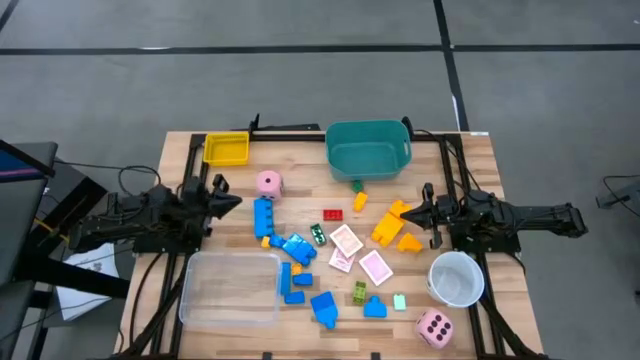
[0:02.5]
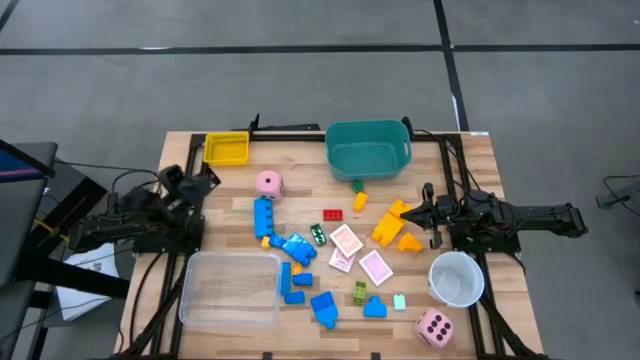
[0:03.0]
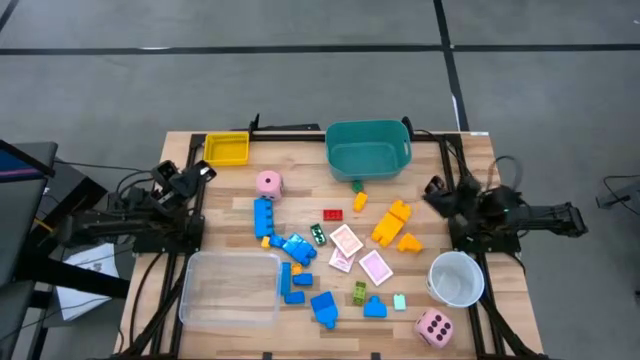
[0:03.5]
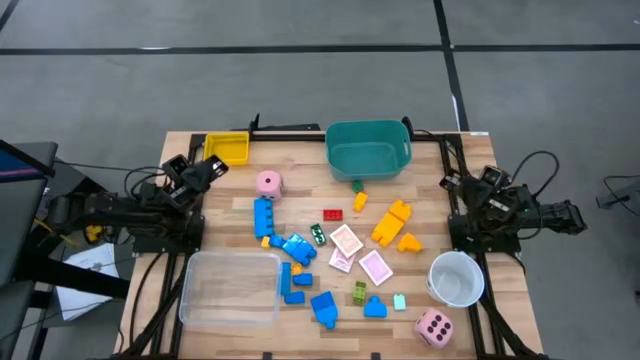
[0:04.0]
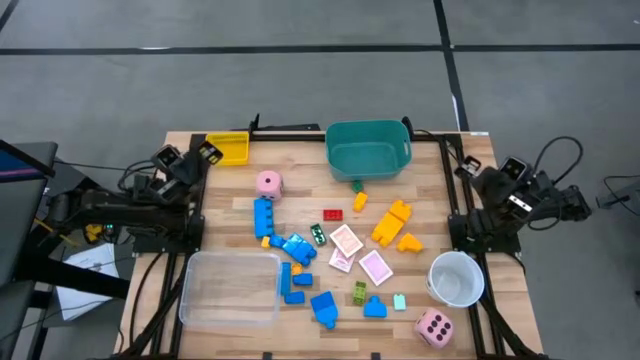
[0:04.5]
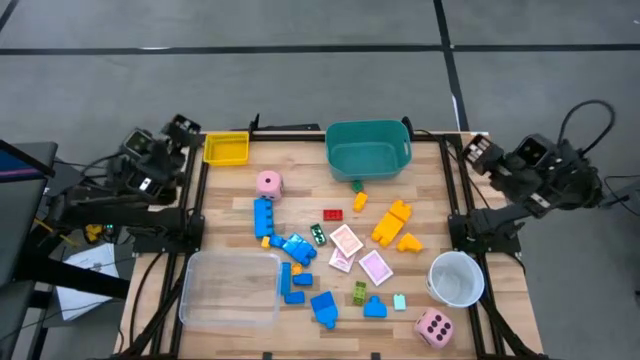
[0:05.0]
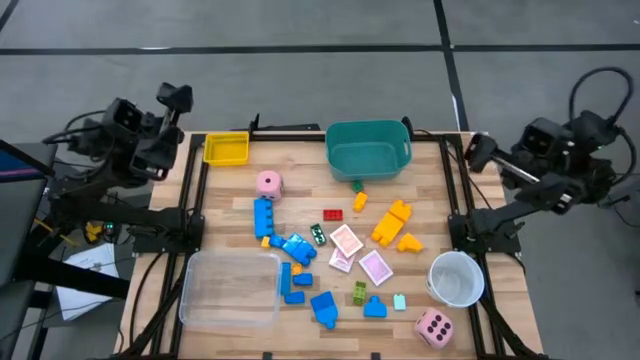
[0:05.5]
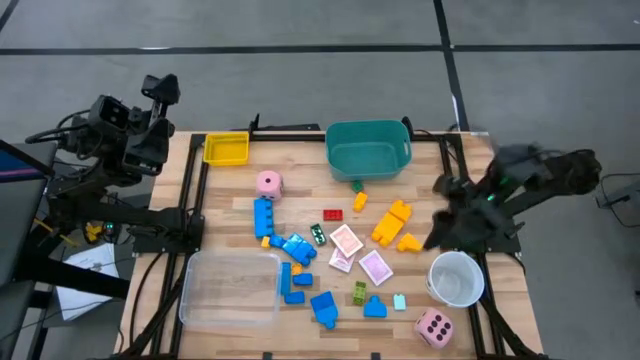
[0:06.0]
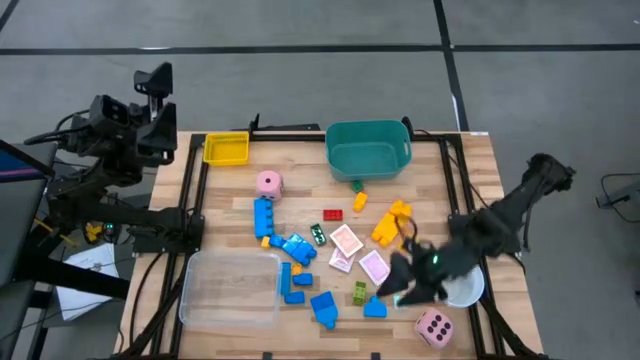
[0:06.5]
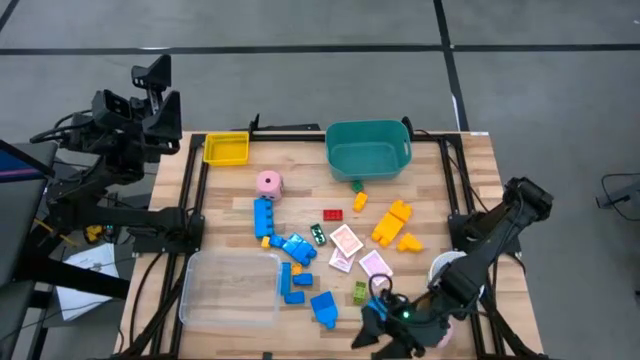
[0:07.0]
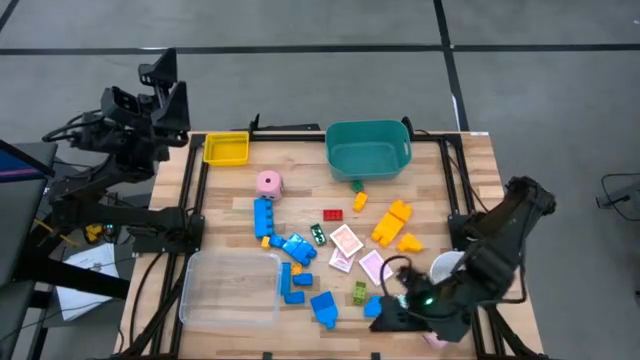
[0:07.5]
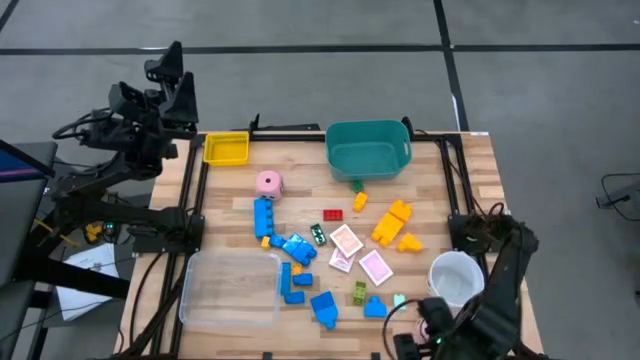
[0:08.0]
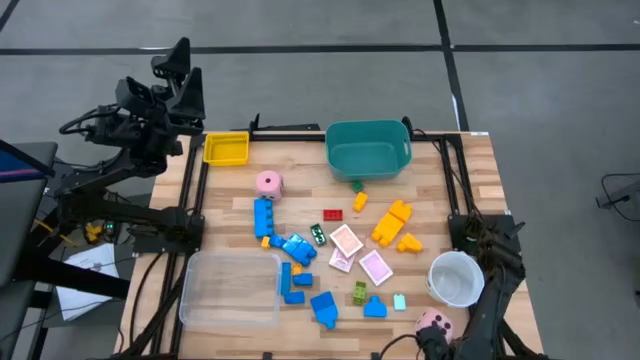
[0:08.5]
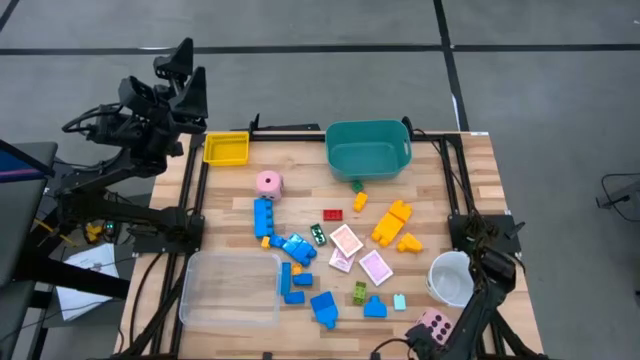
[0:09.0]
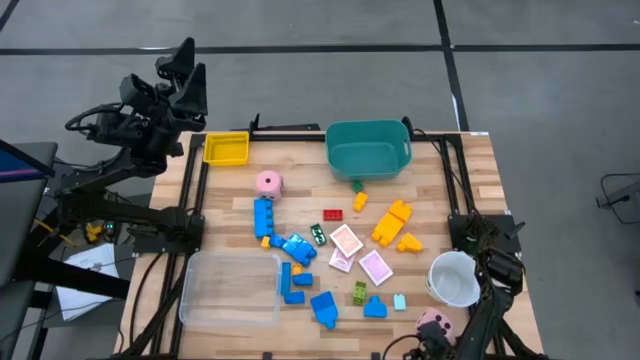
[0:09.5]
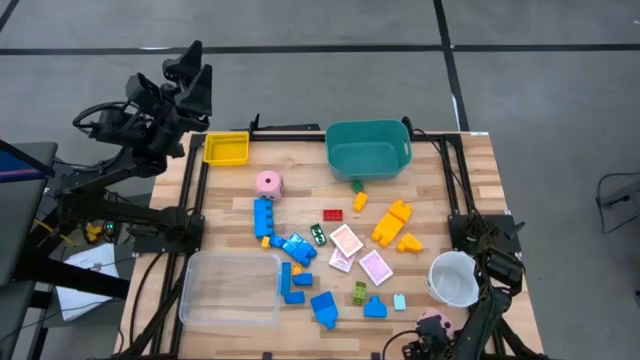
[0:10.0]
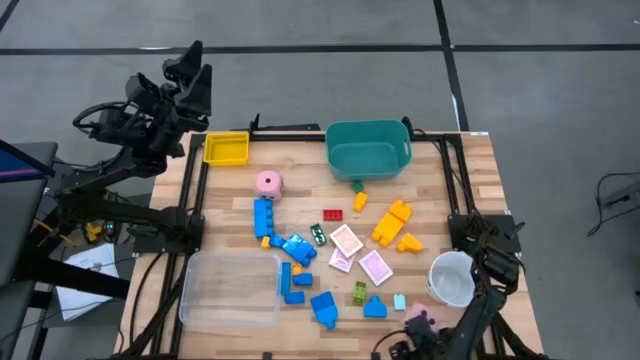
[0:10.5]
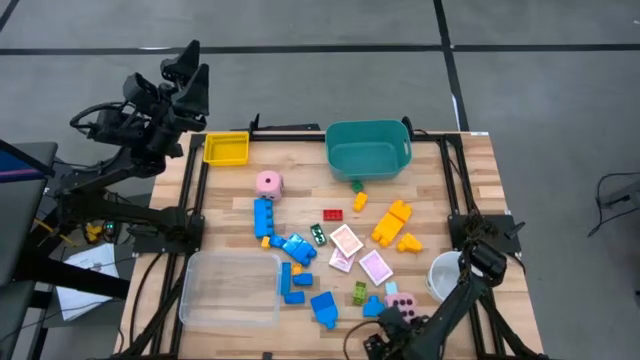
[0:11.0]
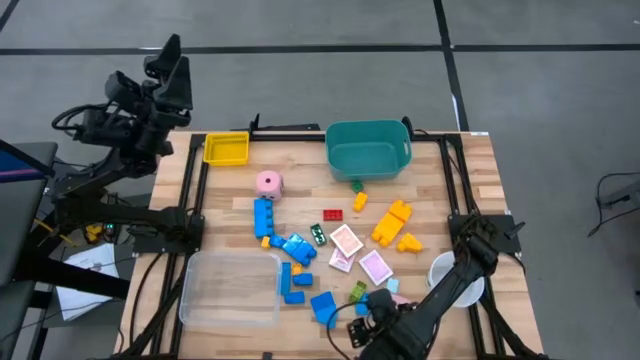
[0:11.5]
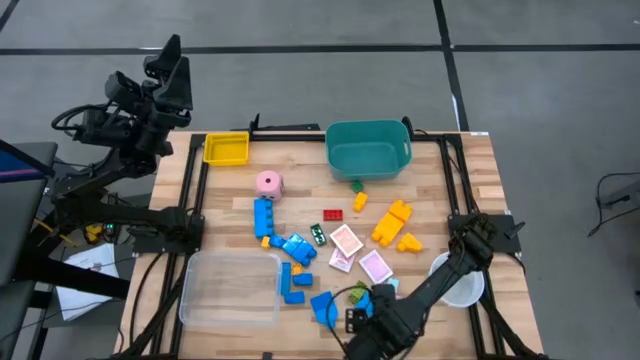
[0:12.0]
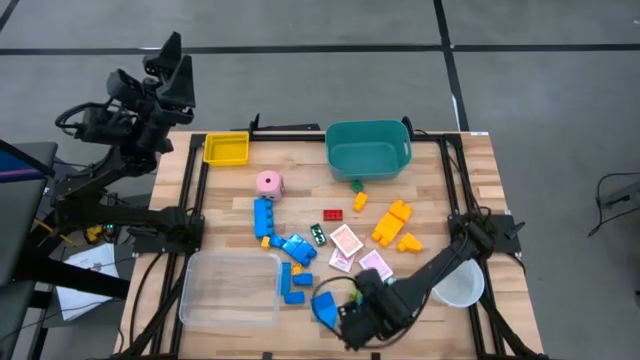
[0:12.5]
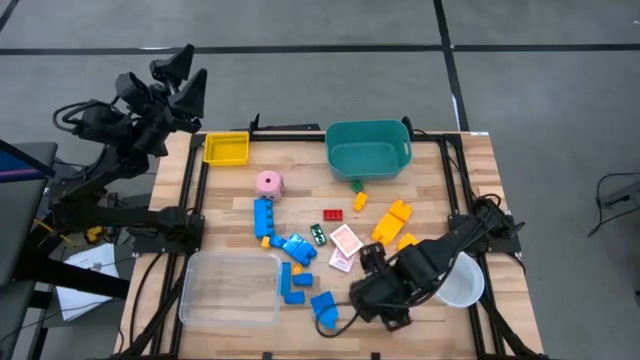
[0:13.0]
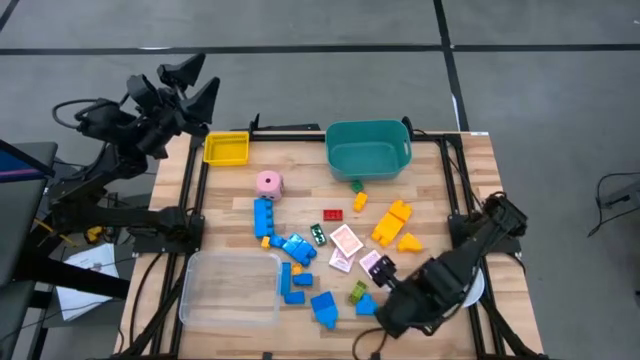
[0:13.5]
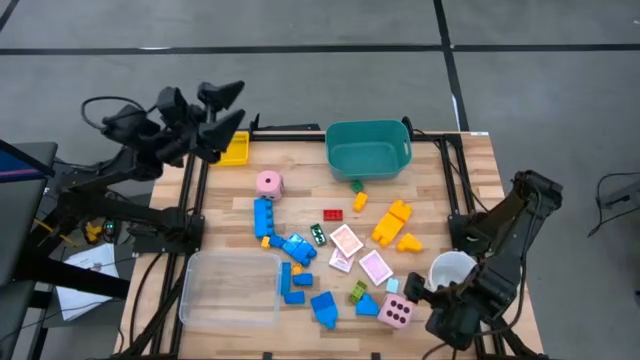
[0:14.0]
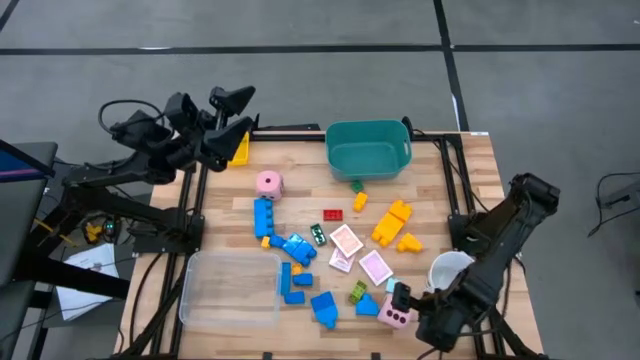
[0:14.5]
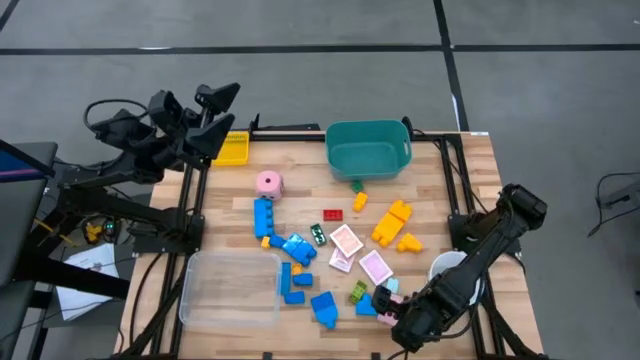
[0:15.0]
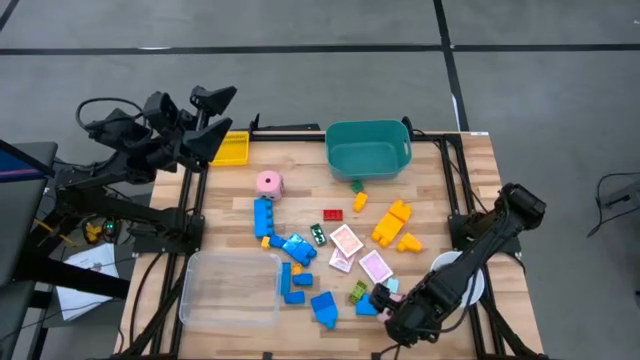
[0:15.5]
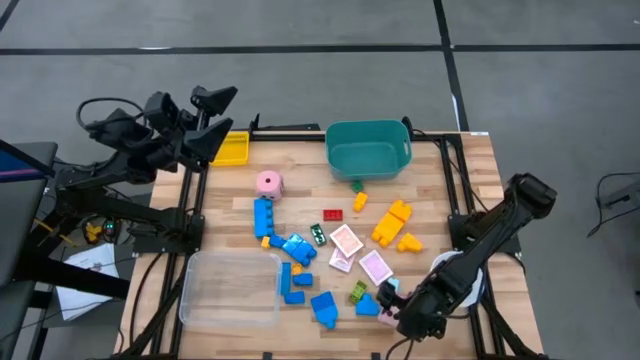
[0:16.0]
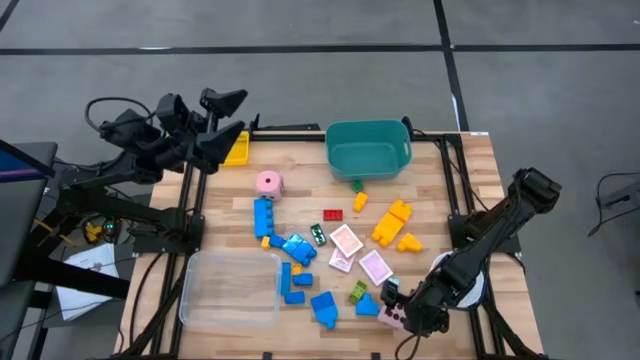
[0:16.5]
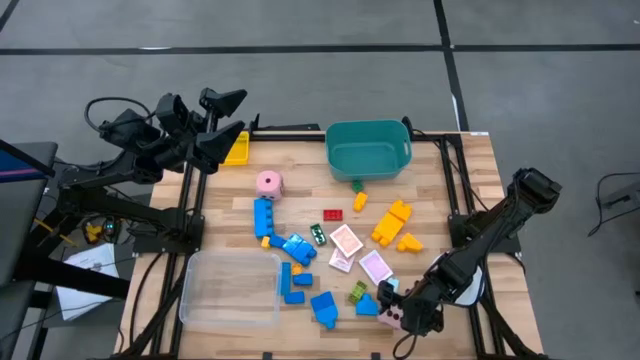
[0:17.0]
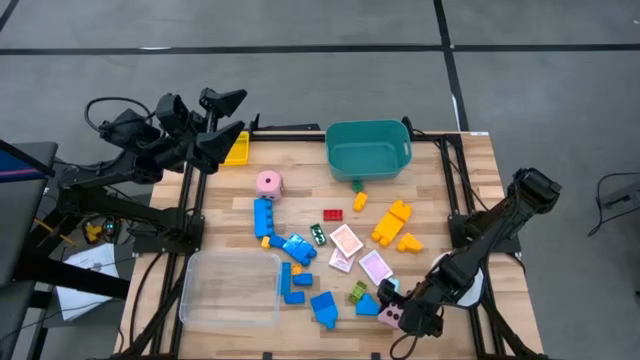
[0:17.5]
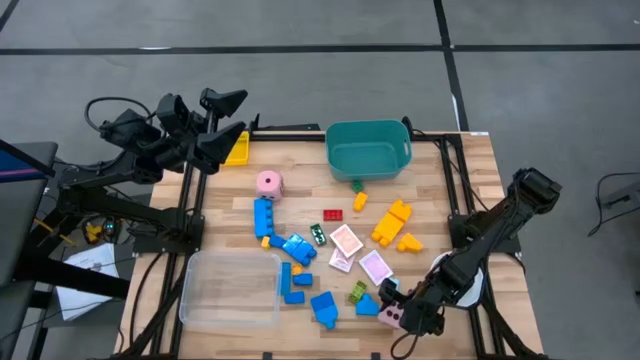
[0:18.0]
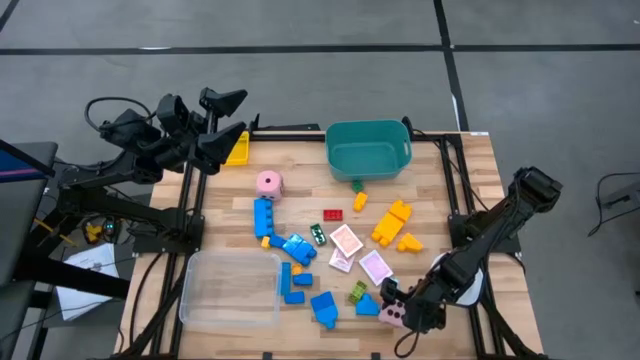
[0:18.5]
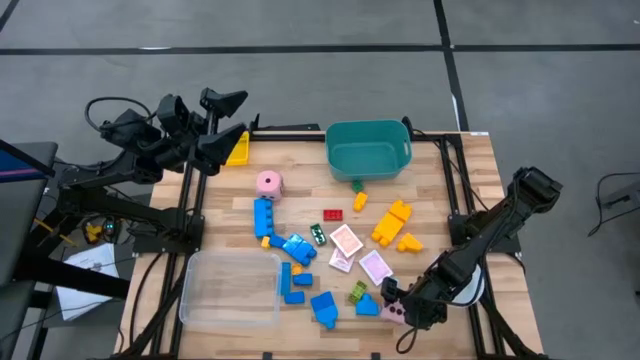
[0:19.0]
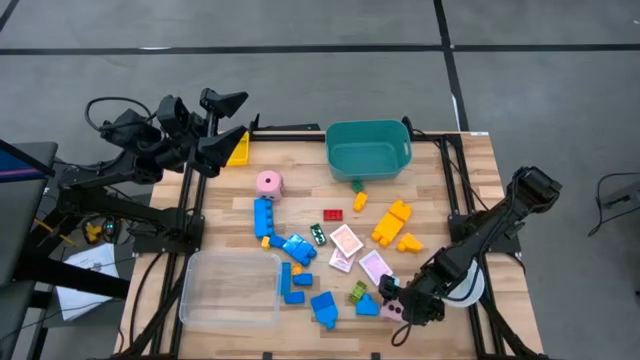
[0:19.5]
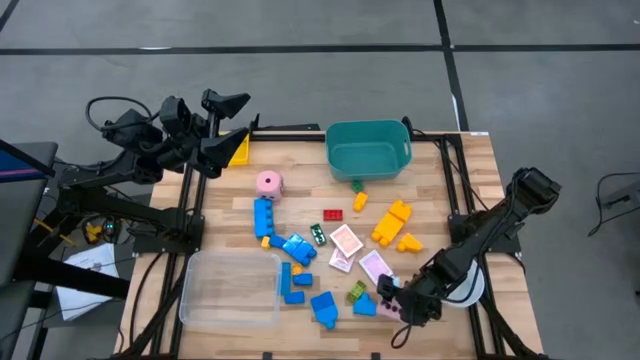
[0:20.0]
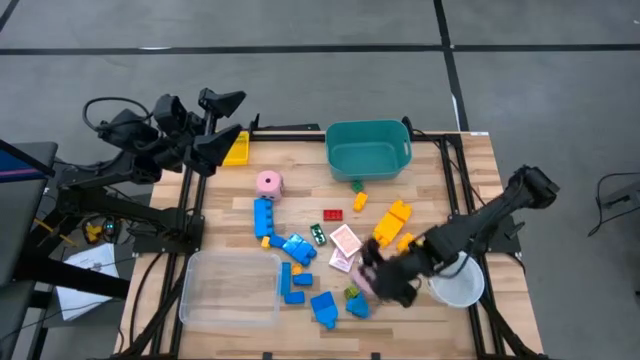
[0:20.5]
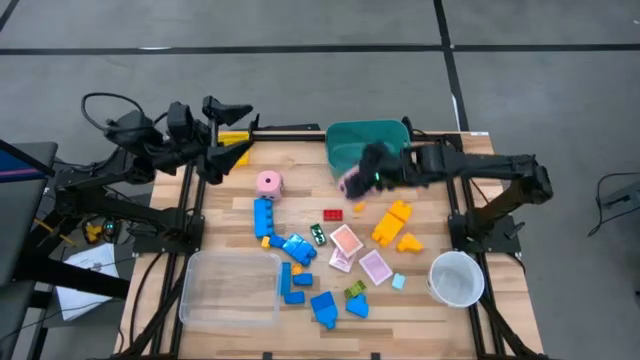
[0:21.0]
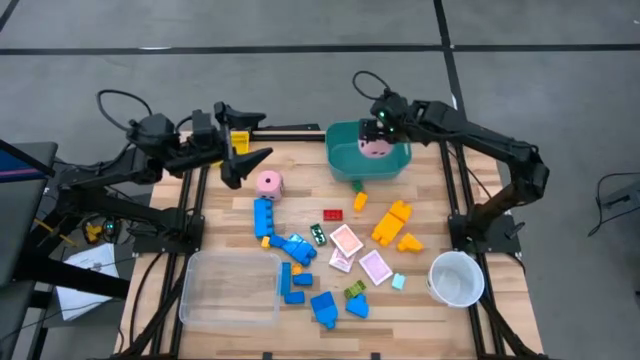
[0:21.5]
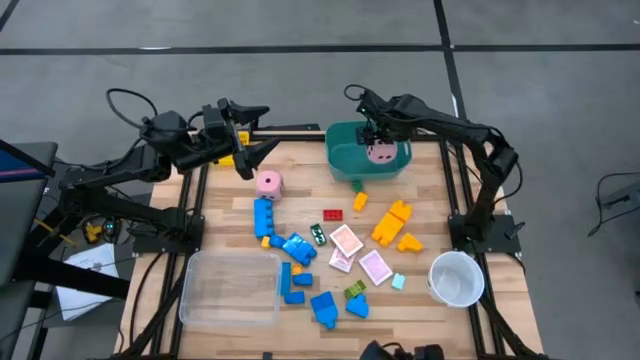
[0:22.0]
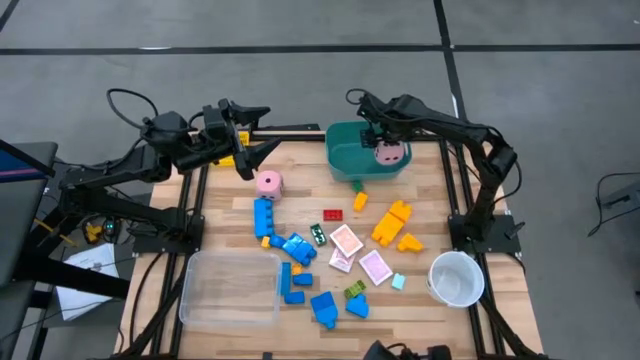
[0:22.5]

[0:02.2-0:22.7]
Task: Pick & Place Toys
Put the bottom pink die into the green bin
